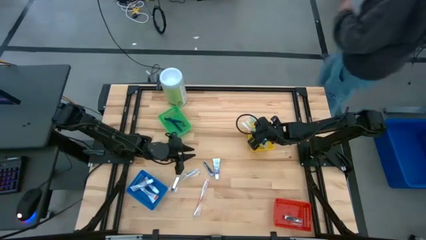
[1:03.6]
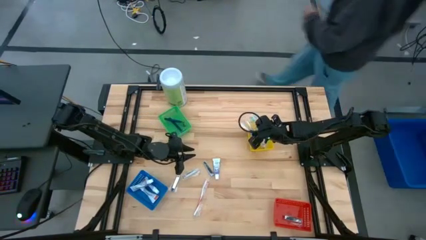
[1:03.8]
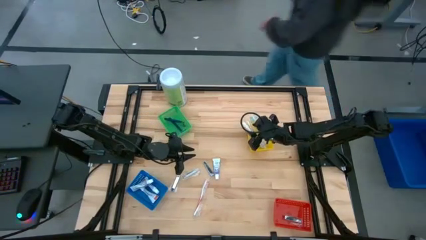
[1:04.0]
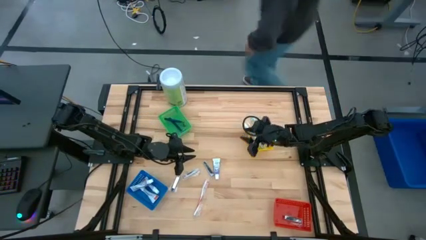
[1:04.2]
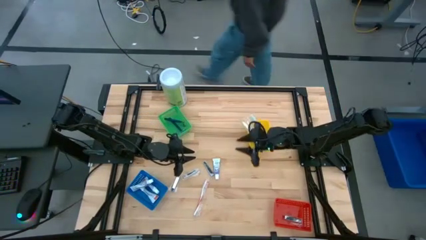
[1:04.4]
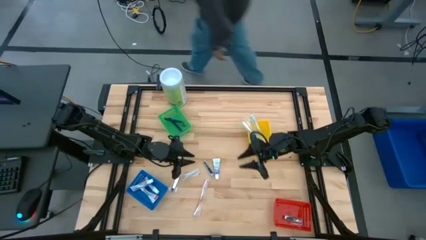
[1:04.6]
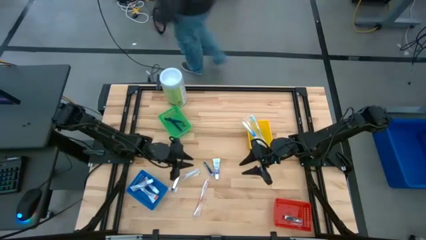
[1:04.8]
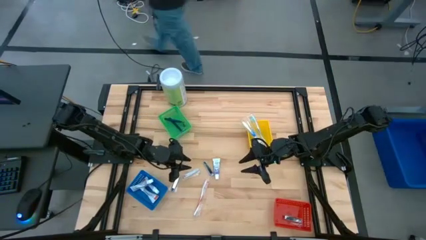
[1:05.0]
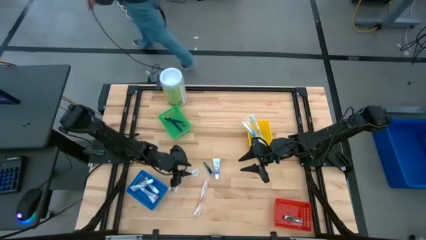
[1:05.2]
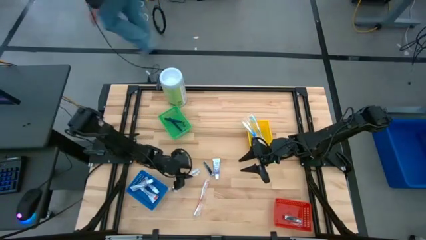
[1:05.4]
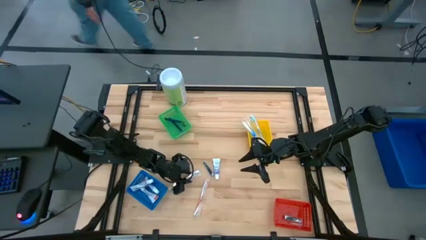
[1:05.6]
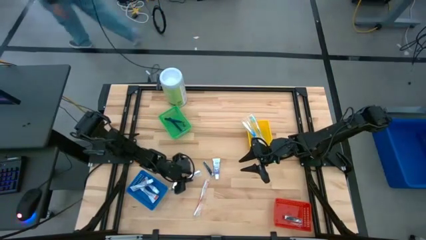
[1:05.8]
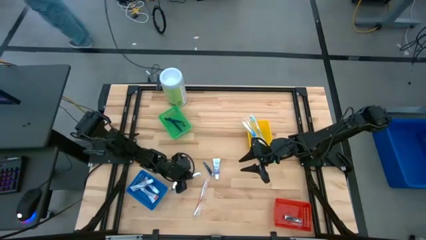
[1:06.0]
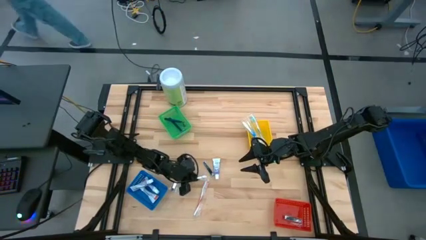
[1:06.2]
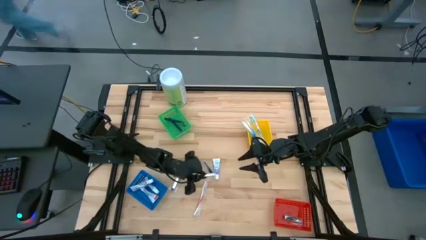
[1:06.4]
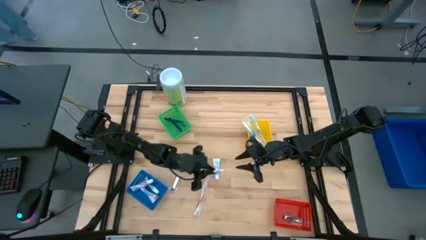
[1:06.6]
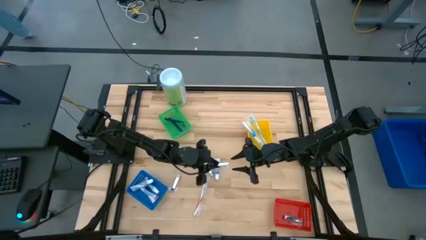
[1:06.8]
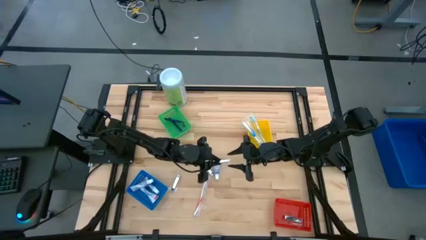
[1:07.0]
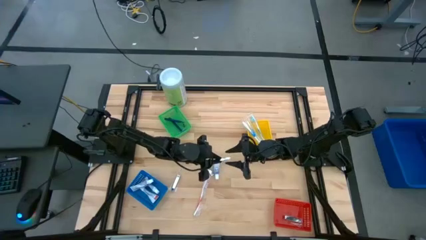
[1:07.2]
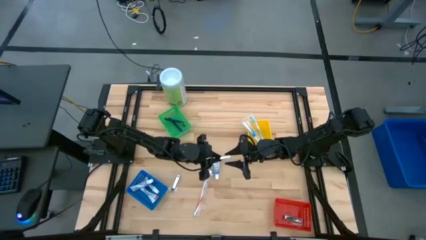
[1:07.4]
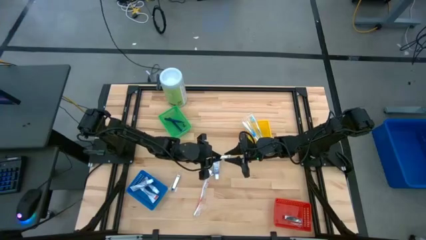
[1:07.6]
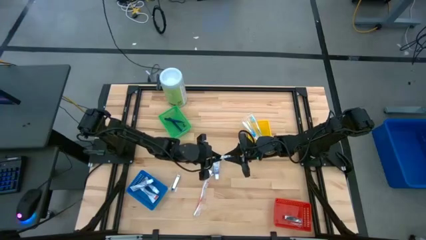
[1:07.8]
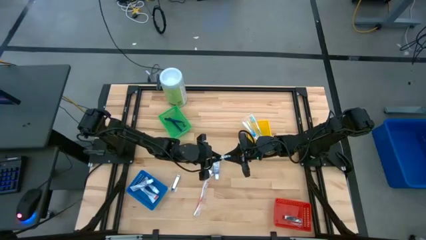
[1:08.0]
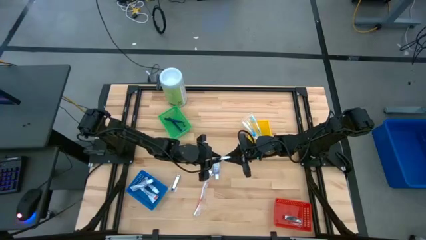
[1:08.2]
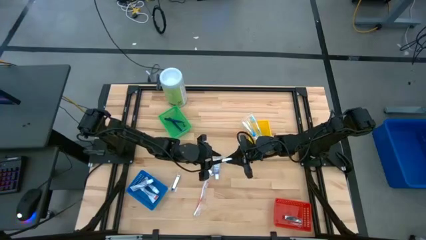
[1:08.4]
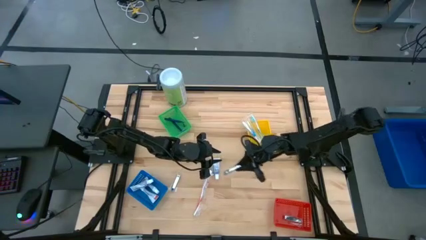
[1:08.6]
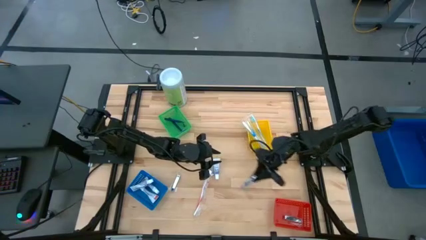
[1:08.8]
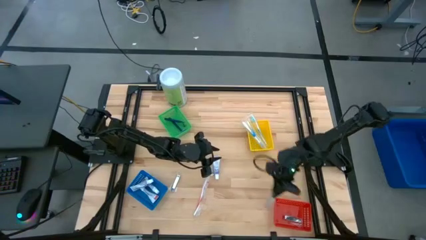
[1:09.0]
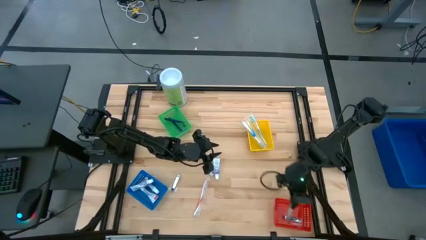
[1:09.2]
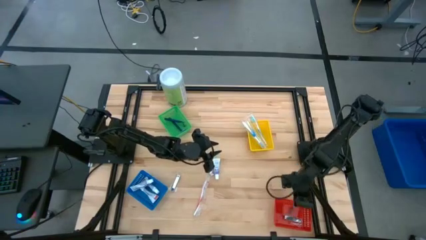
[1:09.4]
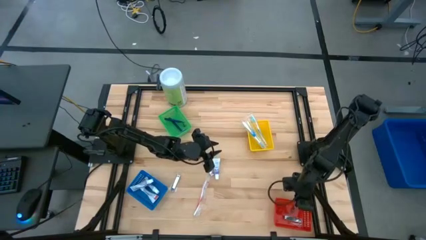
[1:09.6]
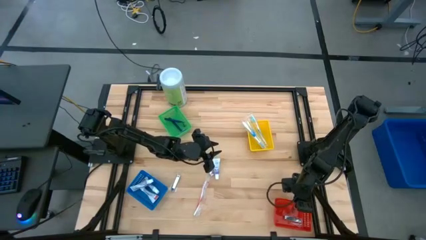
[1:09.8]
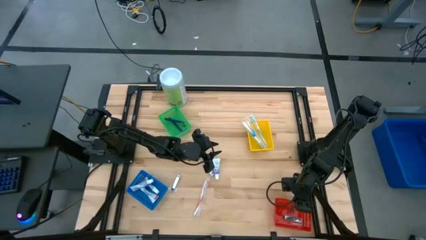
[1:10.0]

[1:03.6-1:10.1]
Task: Pick & Place Travel size toiletries
Put the middle nail cutter into the red bin

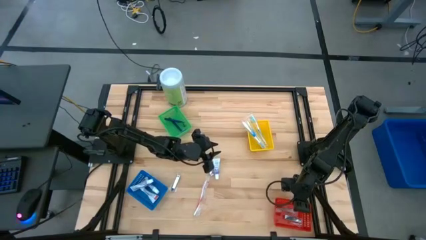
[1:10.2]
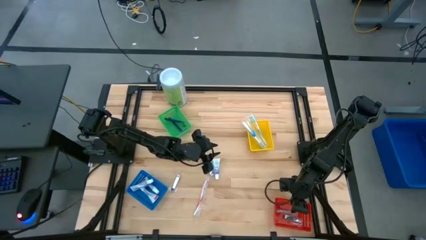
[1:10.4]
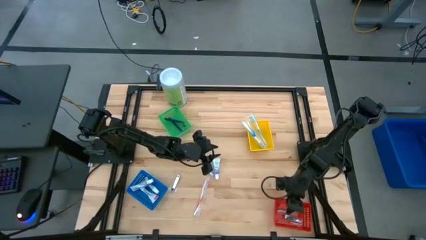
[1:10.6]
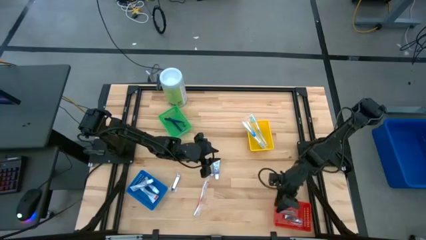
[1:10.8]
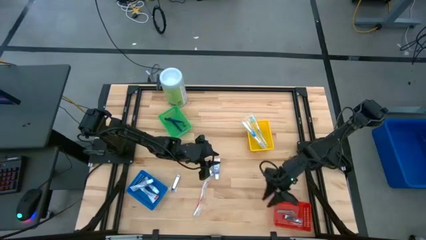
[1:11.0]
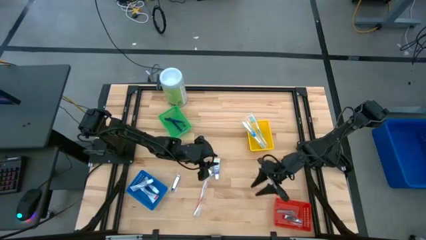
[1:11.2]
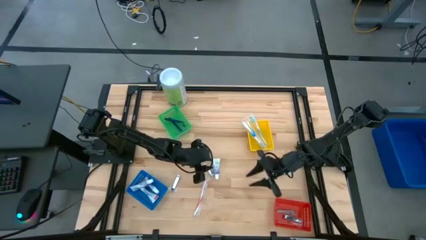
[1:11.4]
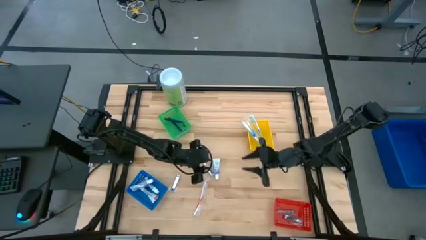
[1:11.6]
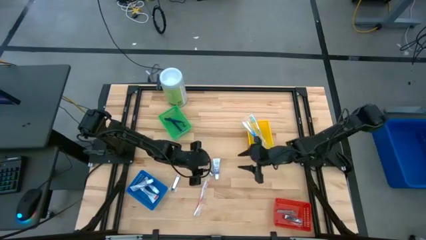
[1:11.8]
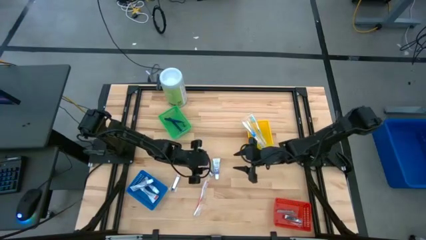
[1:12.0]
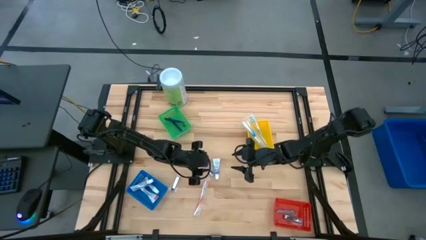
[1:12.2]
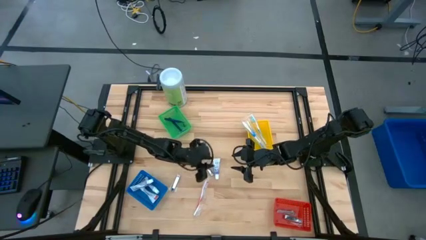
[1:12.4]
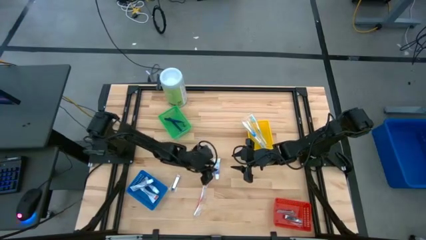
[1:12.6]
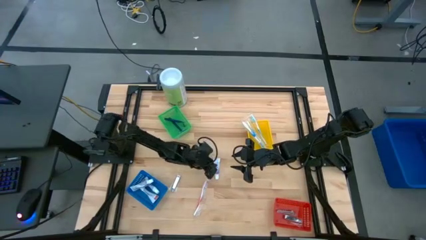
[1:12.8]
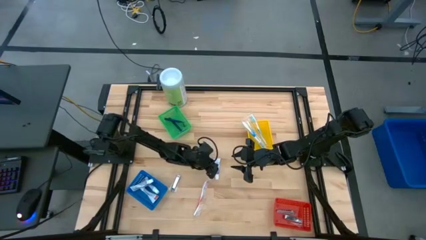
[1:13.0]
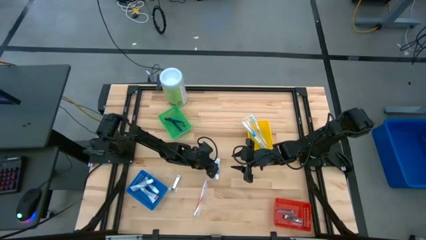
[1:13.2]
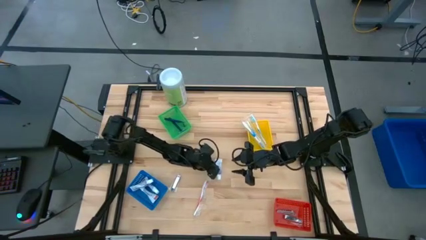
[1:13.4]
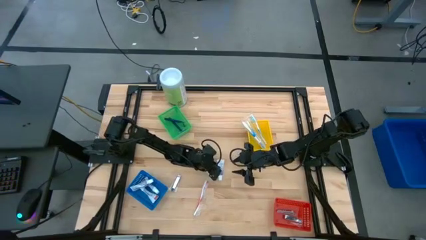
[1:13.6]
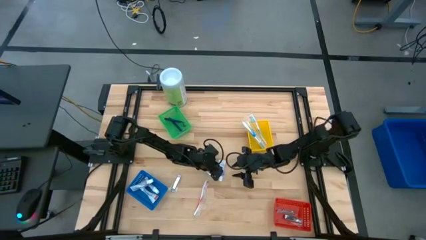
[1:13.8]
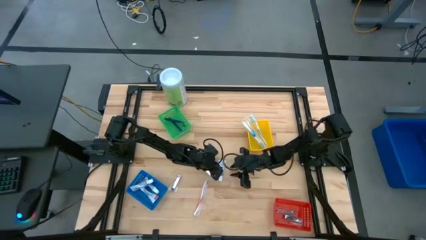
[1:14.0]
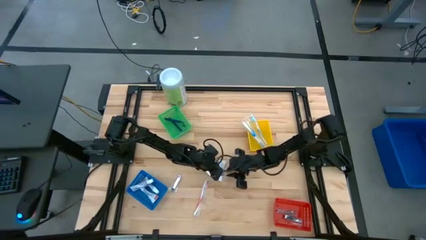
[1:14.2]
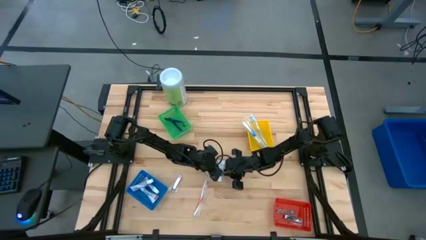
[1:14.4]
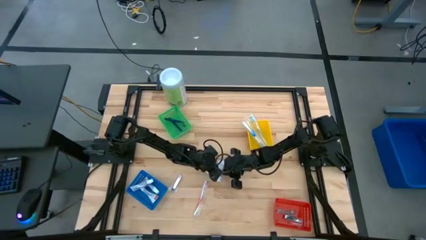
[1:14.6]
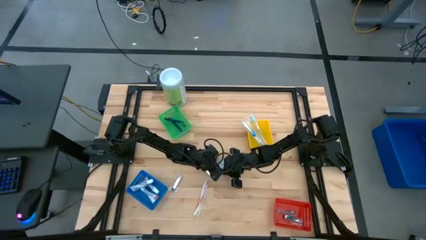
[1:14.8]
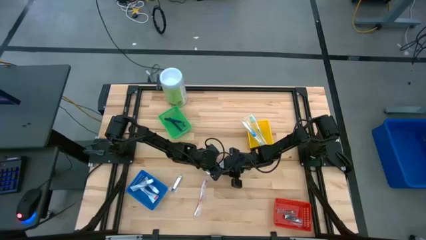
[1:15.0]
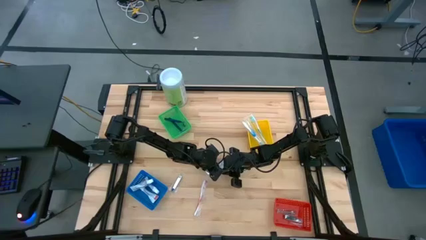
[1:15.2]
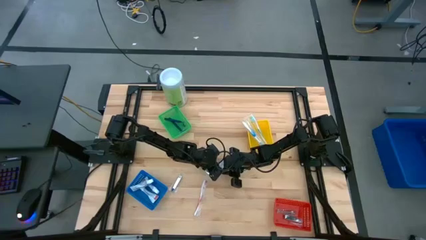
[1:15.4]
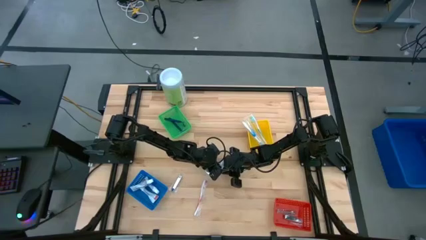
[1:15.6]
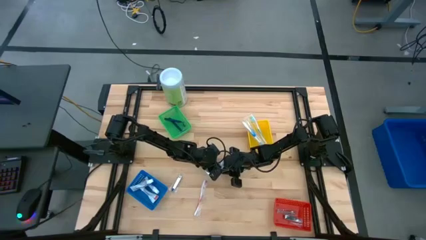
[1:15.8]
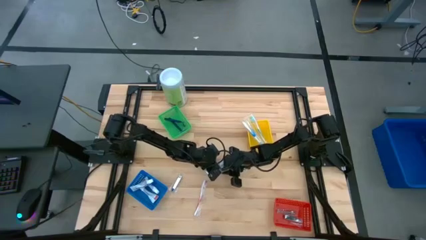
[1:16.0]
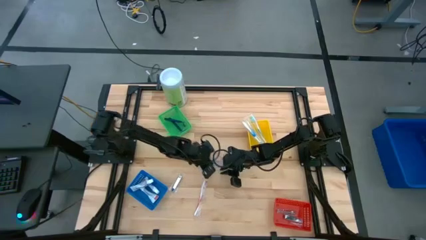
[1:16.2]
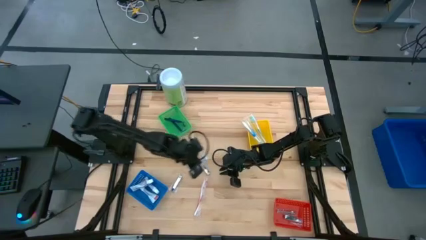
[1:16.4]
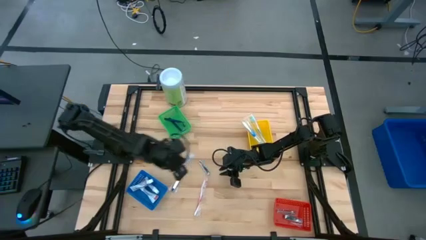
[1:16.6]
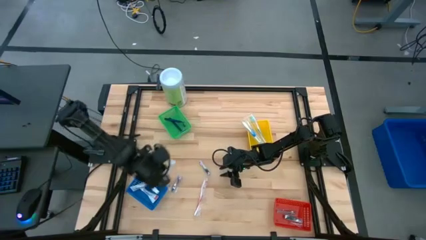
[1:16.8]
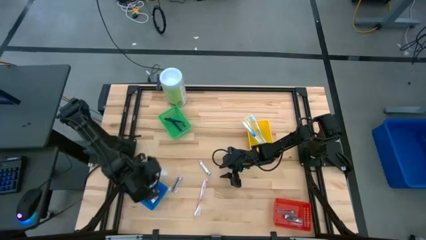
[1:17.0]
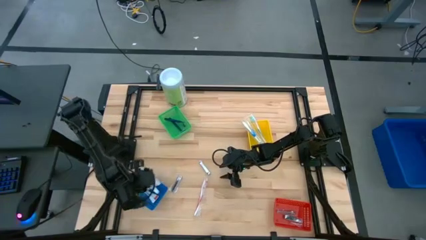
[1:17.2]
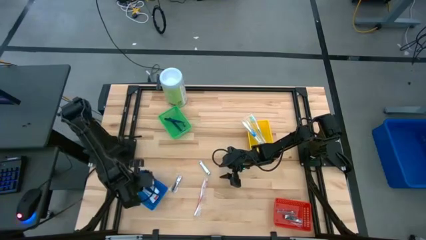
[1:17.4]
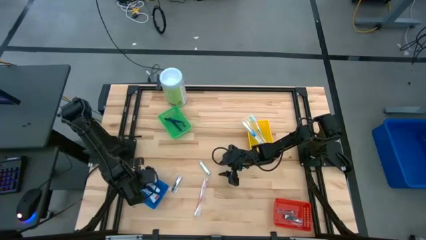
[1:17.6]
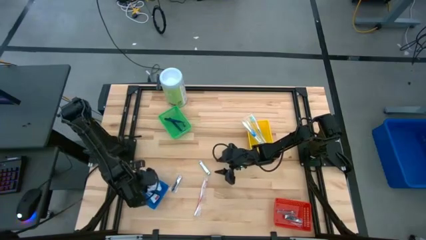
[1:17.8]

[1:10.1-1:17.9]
Put the toothpaste into the blue bin

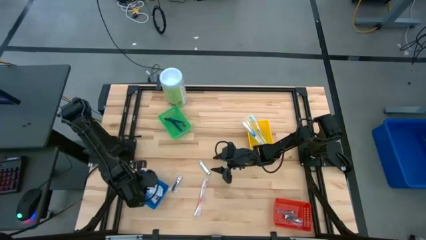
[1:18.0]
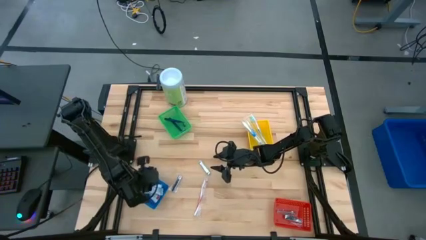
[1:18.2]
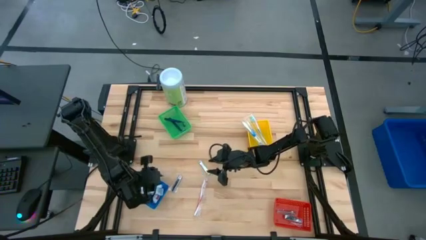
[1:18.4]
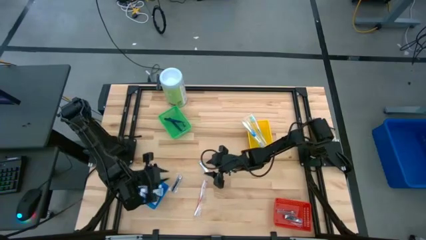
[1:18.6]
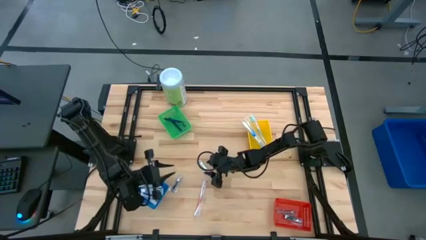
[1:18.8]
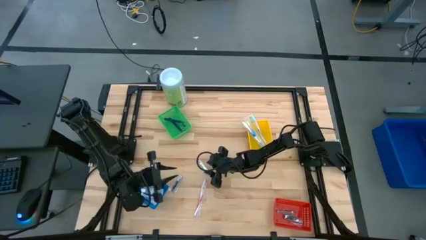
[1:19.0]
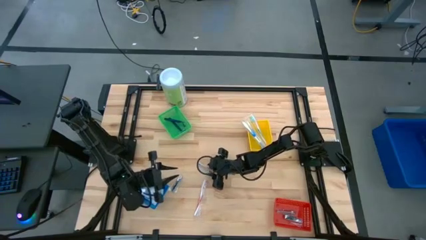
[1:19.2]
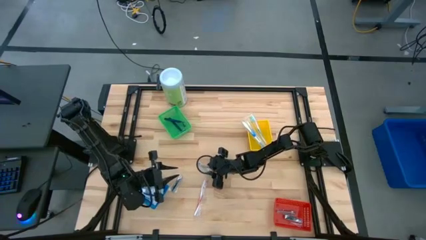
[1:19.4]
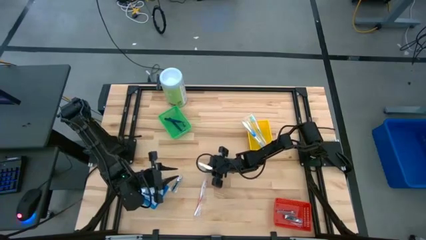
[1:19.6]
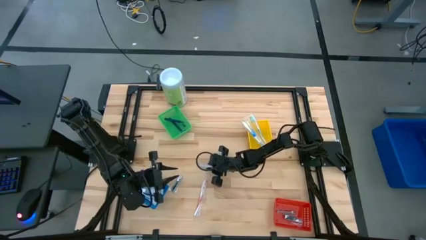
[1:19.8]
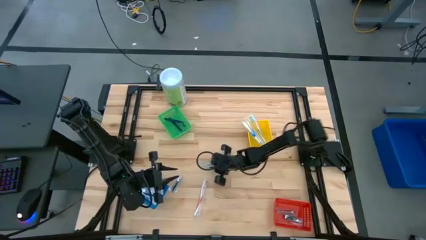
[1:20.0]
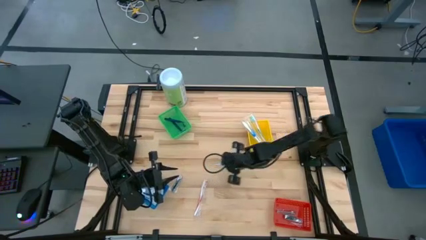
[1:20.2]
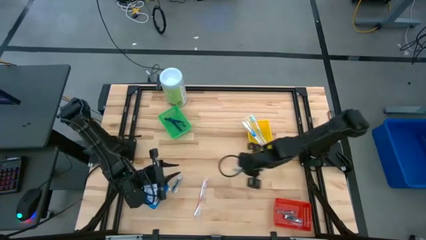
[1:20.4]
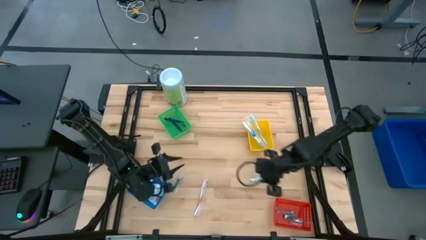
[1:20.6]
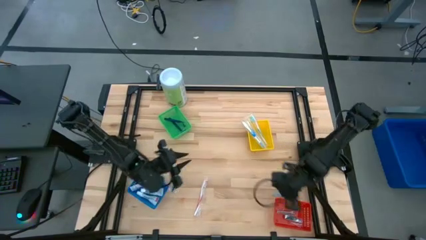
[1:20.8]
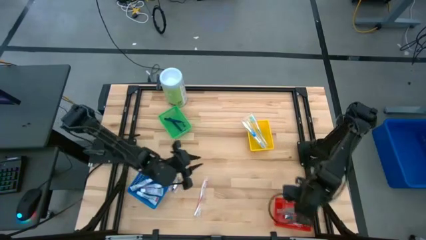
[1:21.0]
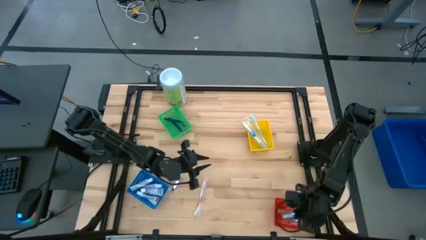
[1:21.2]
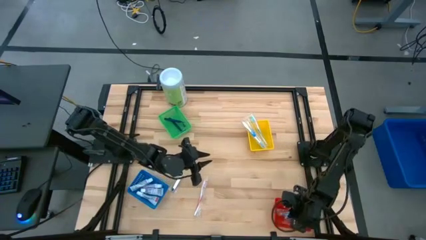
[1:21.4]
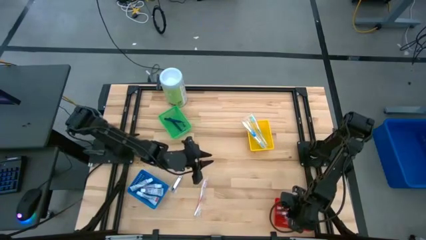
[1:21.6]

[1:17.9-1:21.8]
Put the right nail cutter into the red bin
